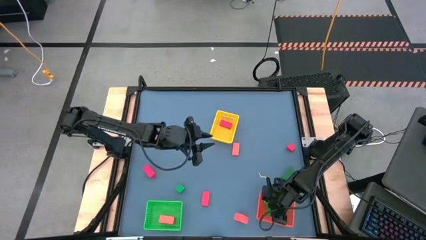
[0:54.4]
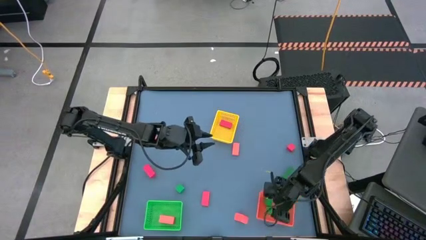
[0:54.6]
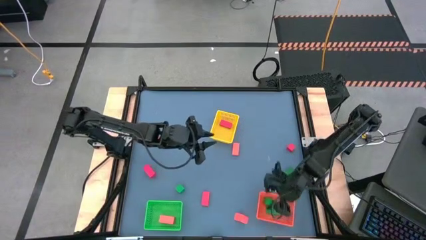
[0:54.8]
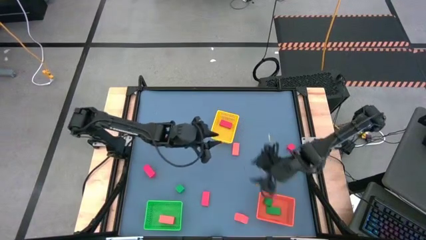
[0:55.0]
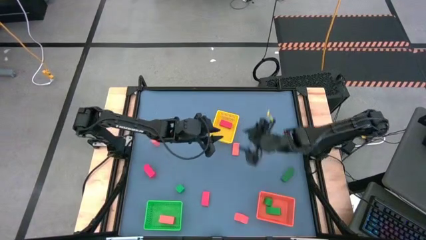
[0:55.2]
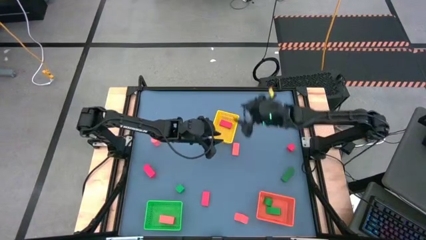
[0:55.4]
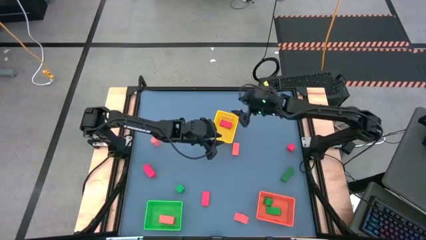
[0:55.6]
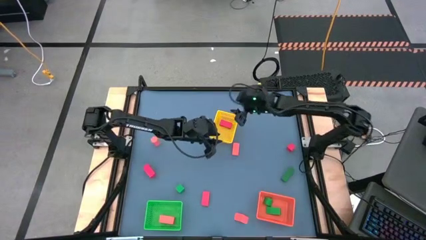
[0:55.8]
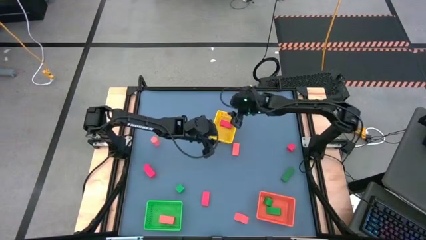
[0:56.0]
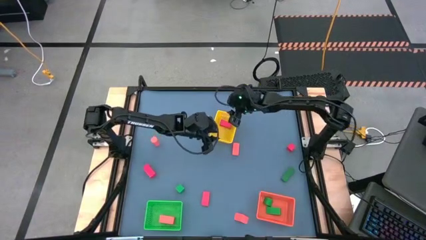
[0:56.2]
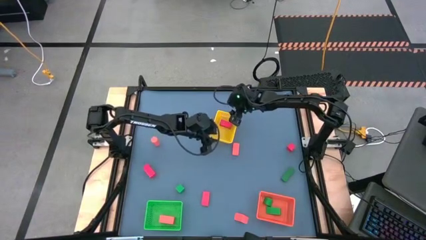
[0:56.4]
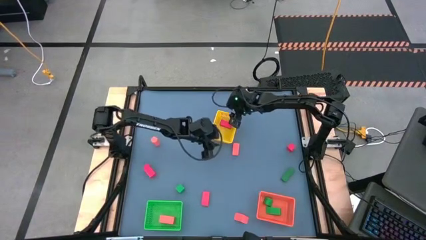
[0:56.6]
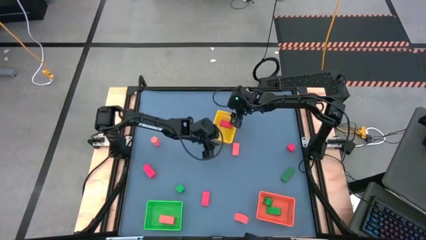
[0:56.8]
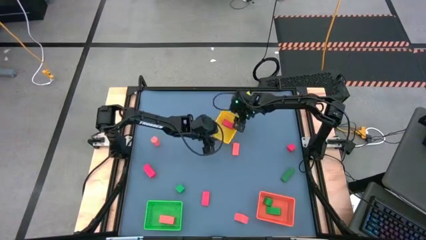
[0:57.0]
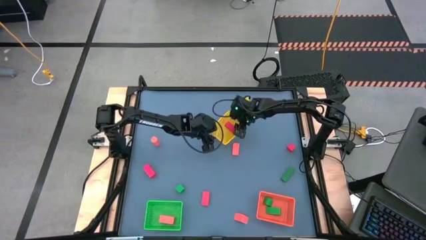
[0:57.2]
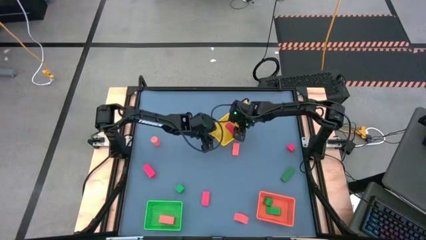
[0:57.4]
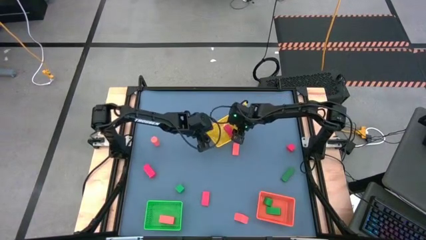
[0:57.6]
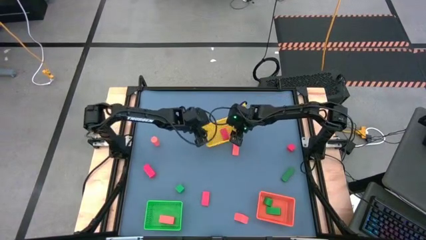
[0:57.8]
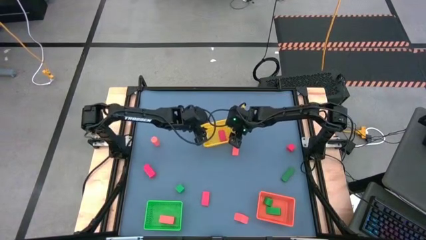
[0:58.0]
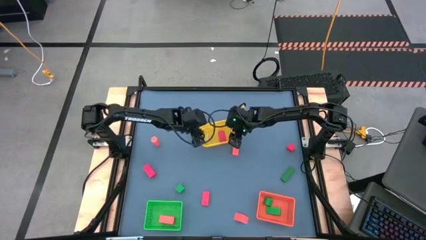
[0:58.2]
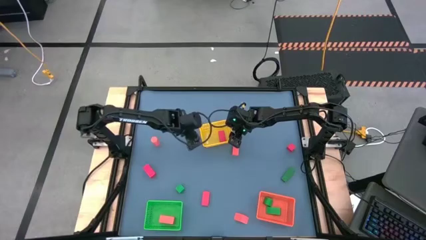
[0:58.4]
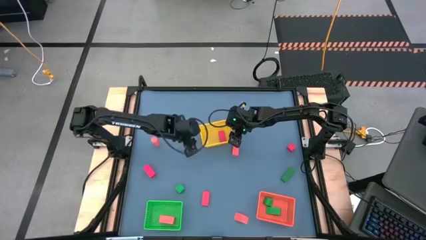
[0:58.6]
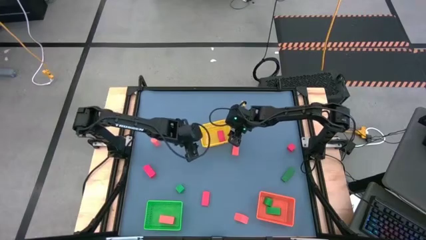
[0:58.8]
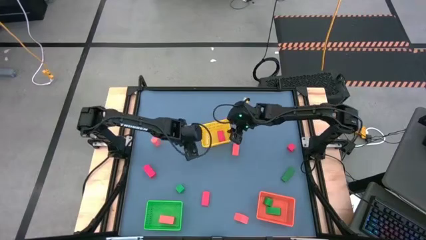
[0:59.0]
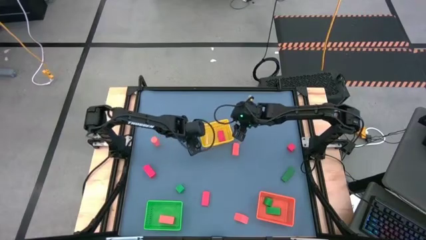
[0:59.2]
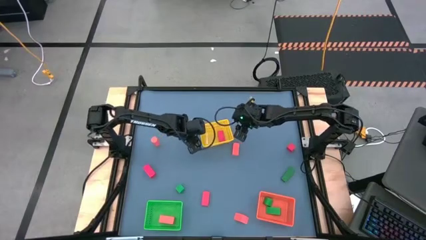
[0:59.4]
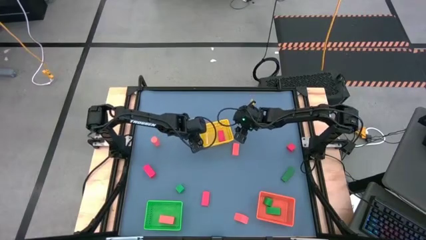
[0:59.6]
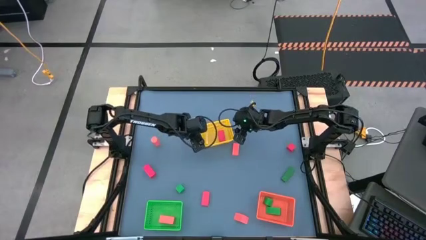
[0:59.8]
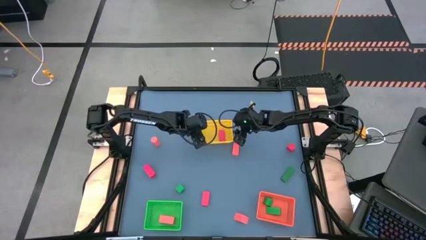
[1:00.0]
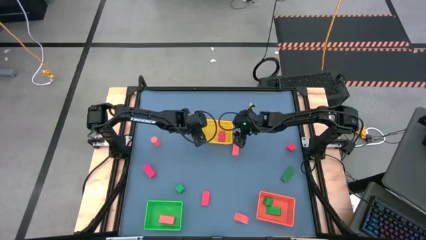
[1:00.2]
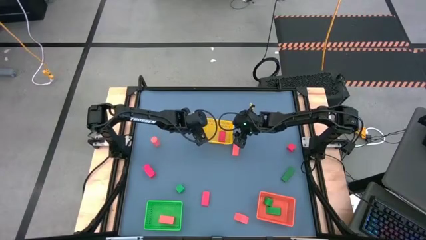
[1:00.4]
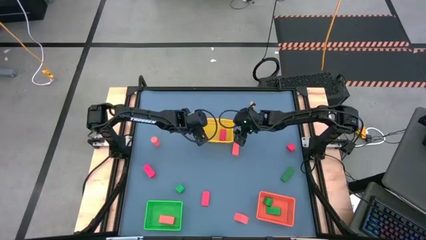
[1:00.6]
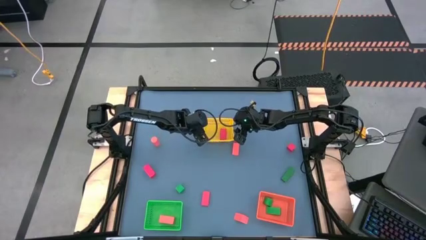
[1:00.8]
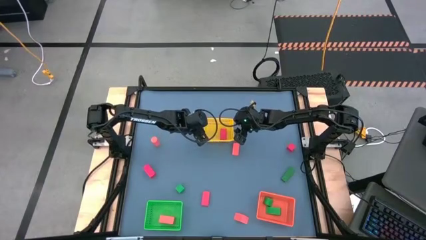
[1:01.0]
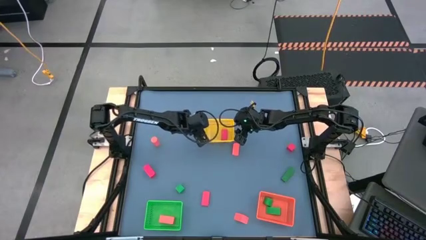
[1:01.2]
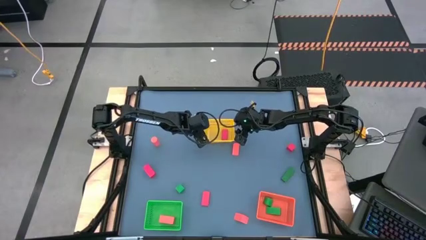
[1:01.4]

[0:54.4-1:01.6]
Task: Sort & place blocks by color
Adjust the yellow bin

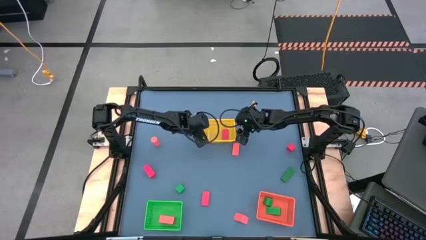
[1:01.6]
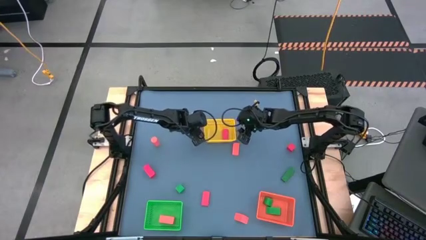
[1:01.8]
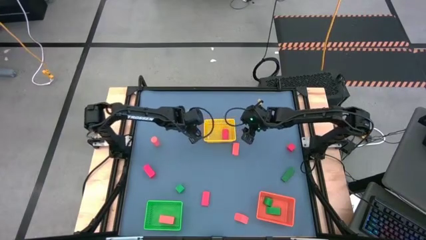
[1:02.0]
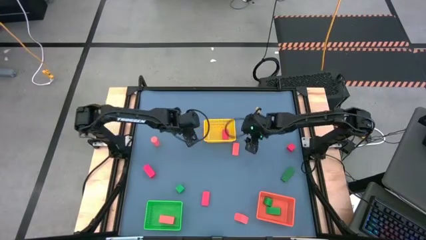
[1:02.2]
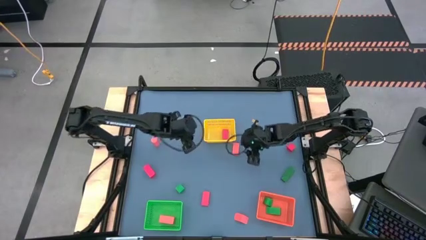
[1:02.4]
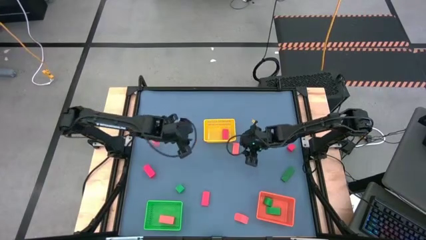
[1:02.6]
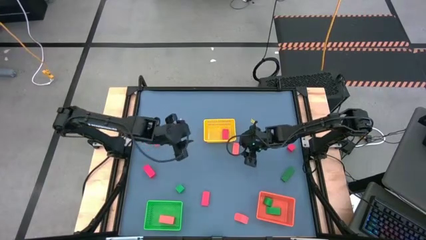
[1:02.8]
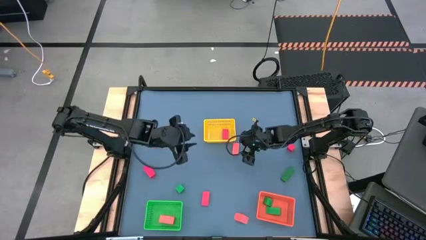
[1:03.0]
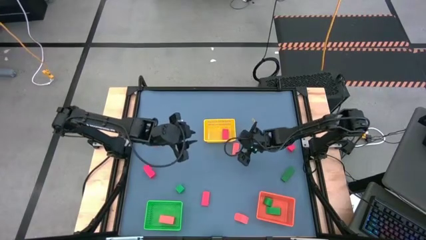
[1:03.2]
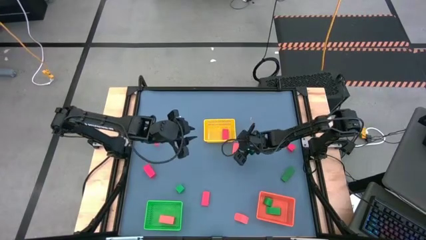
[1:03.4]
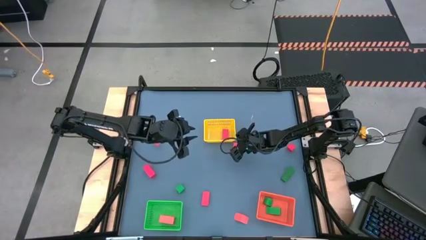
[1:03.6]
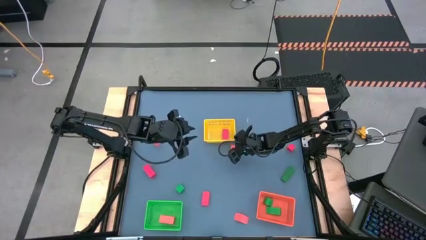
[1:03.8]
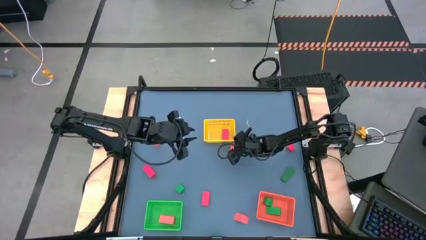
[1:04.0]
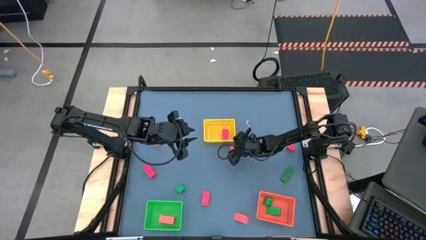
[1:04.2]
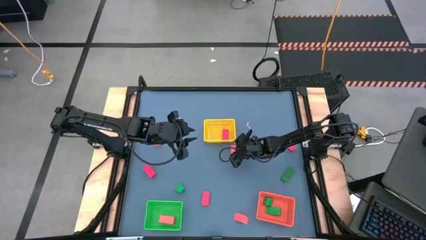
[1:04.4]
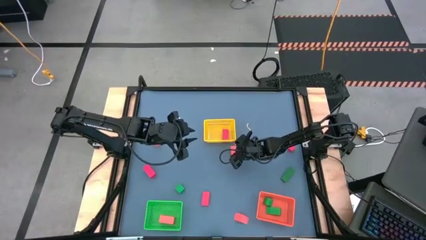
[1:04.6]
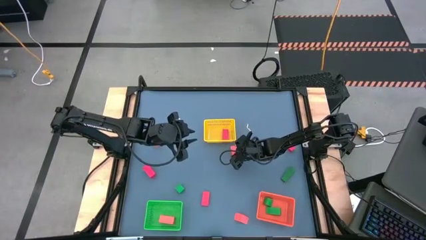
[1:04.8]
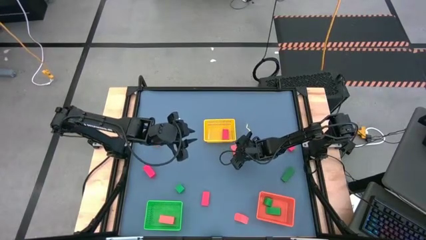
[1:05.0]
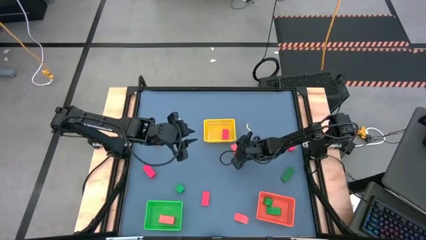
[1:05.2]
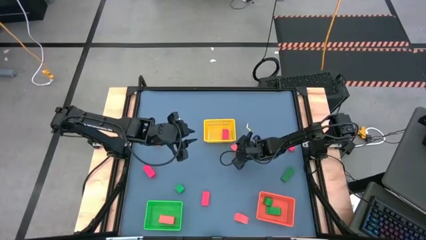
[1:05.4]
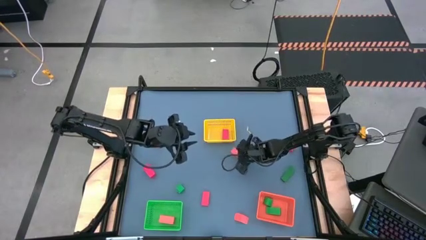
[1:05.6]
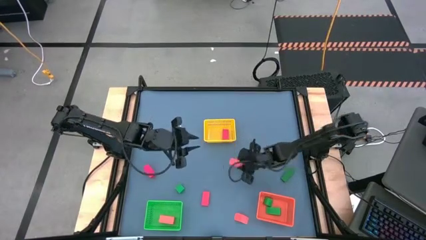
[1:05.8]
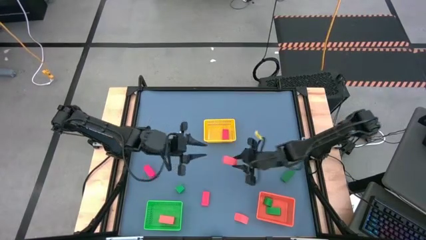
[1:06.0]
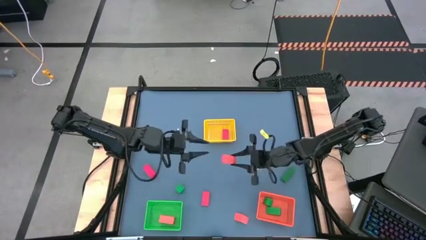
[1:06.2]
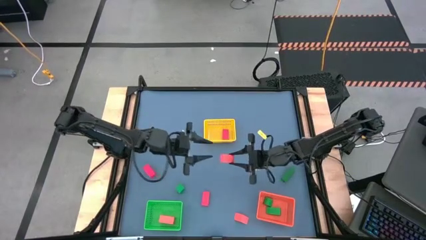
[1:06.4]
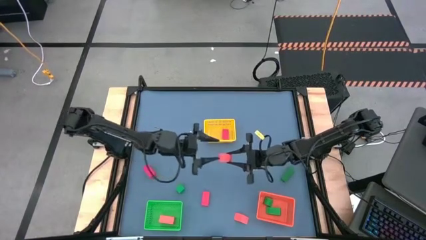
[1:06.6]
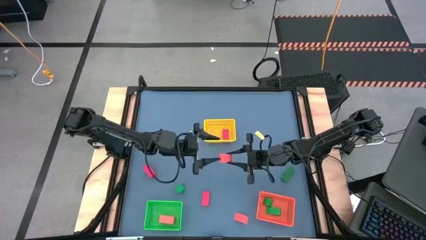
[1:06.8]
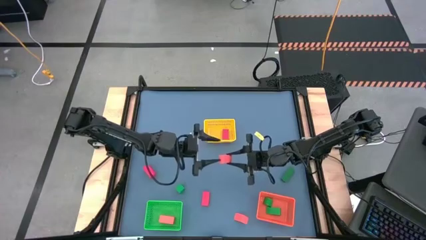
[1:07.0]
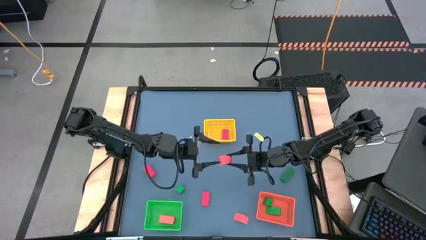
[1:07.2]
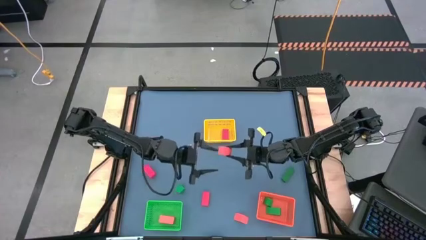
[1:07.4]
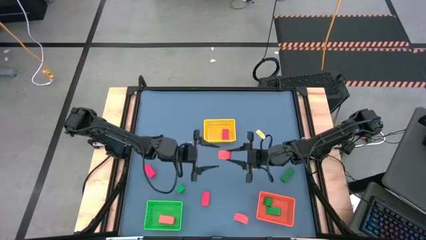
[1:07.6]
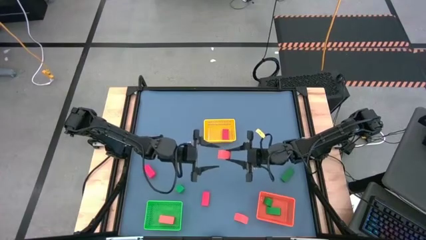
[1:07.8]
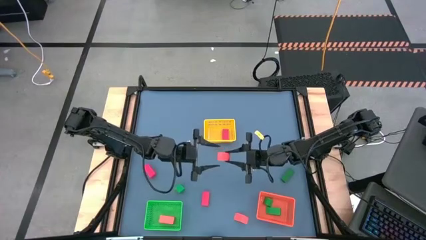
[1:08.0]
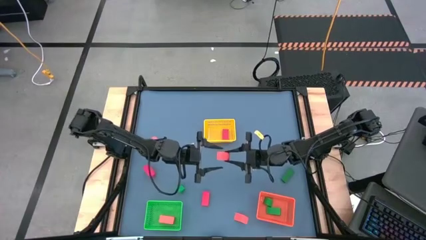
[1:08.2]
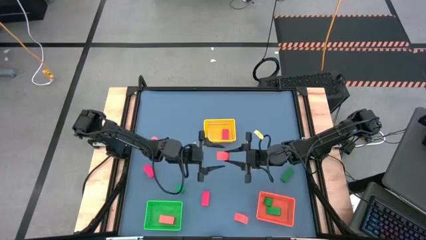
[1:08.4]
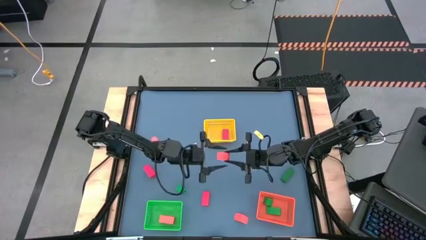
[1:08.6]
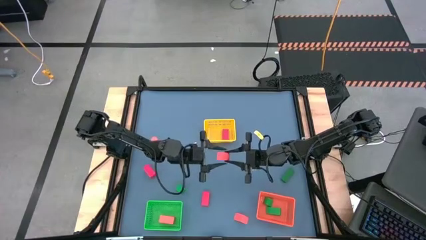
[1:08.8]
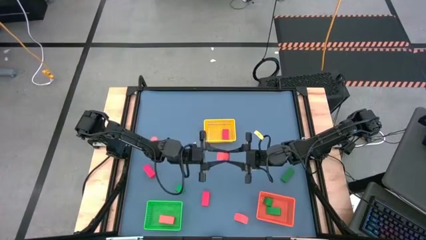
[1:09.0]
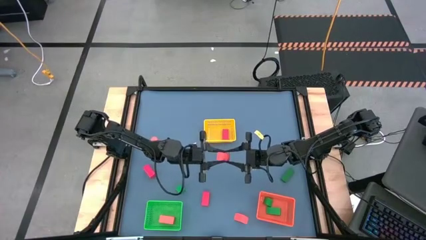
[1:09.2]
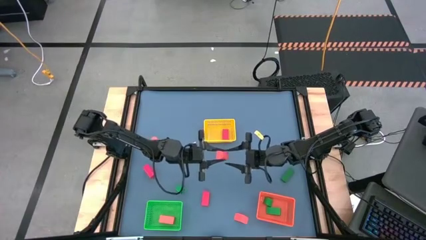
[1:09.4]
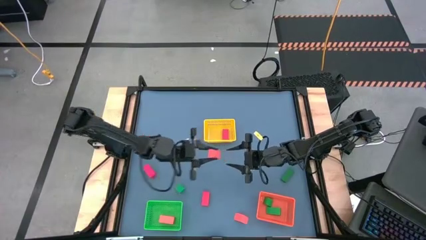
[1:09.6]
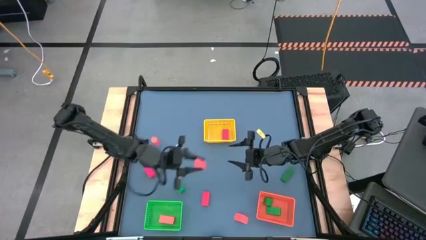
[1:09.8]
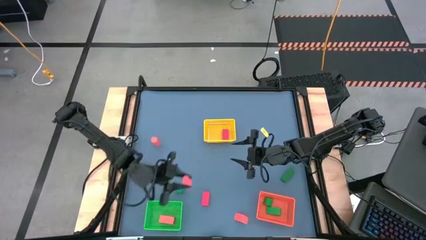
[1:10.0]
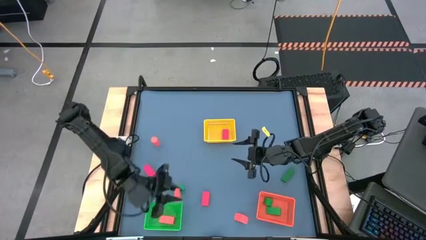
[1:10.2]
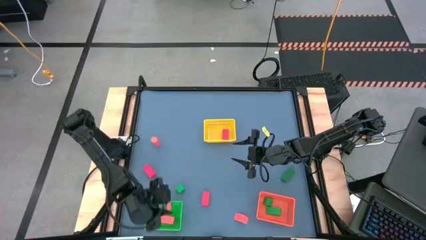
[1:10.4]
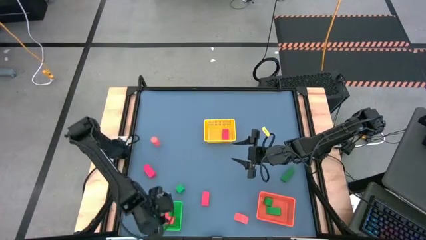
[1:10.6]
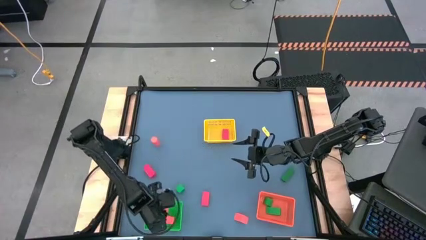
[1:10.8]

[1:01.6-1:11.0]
Put the orange block into the green bin
